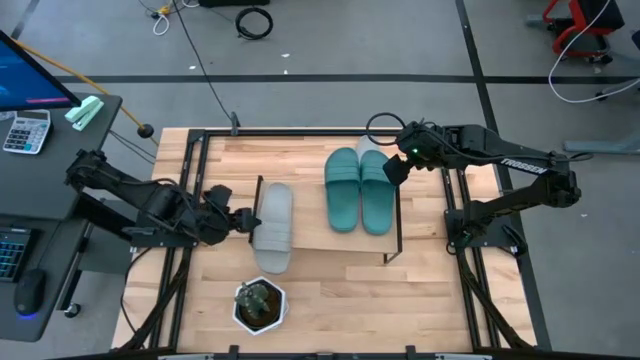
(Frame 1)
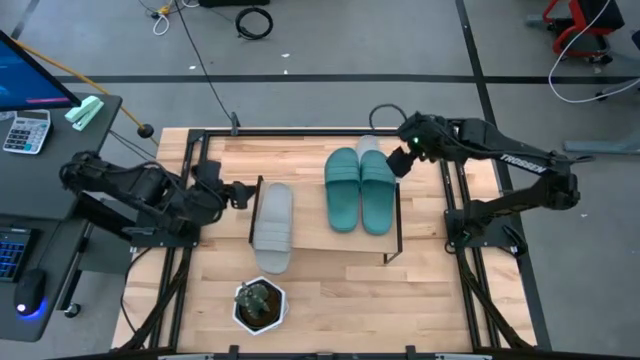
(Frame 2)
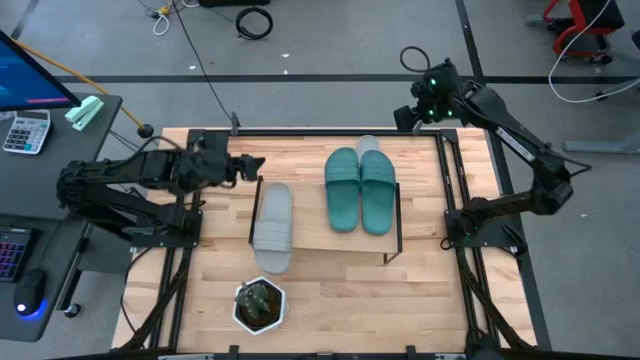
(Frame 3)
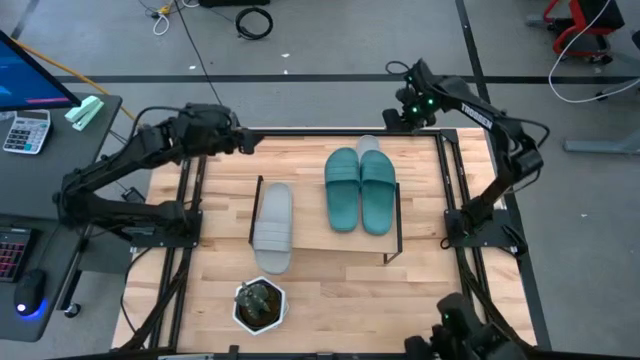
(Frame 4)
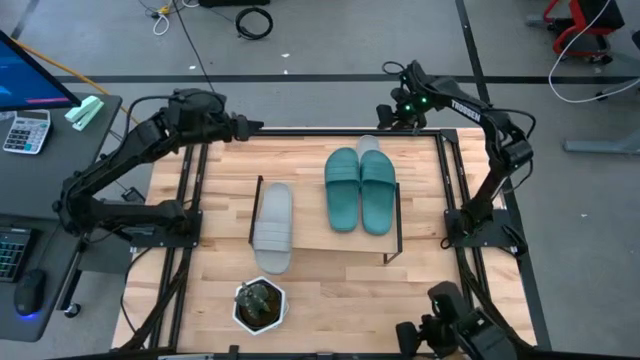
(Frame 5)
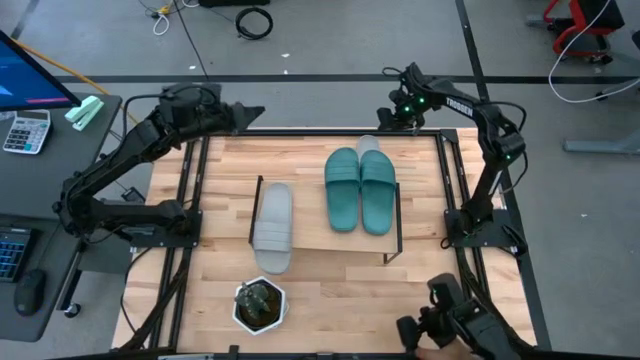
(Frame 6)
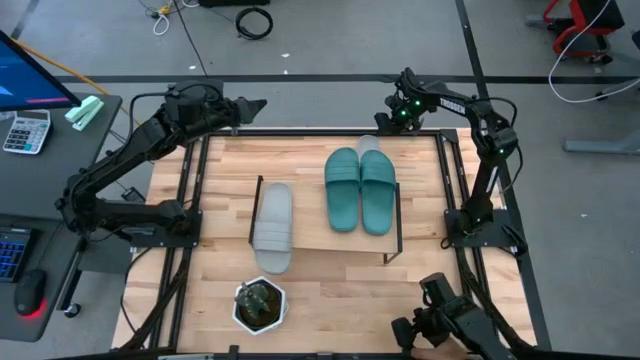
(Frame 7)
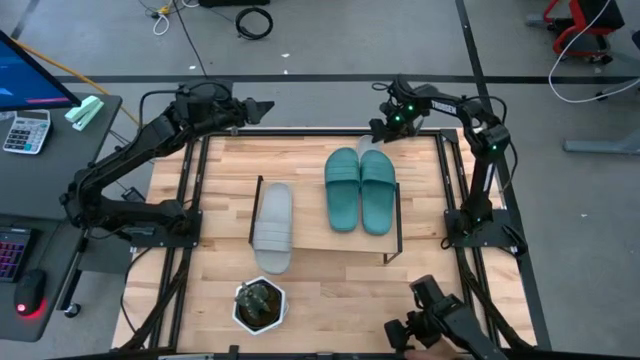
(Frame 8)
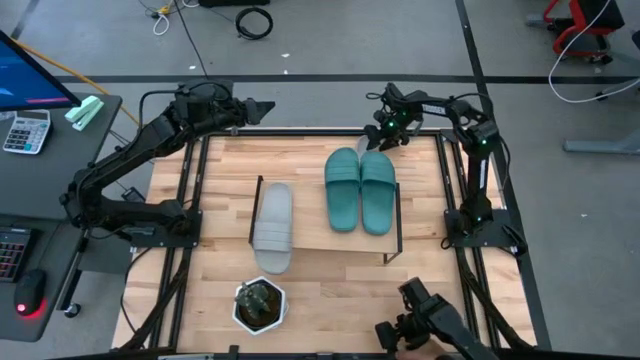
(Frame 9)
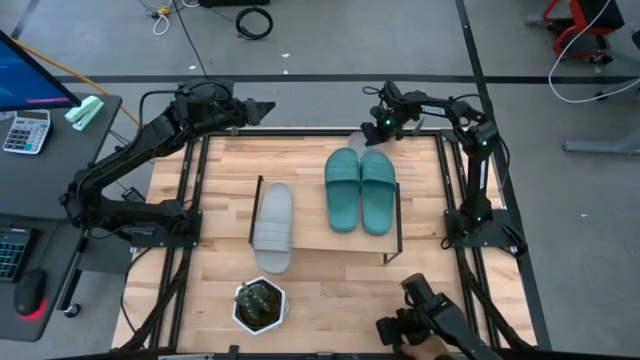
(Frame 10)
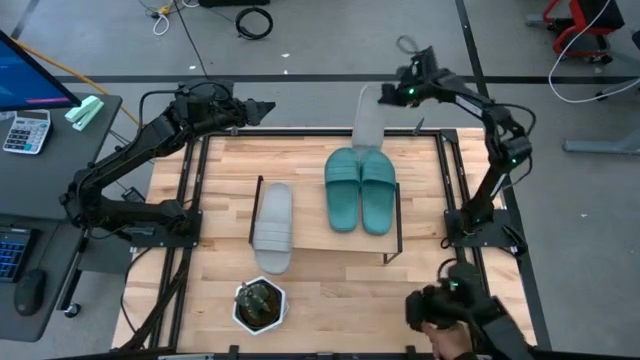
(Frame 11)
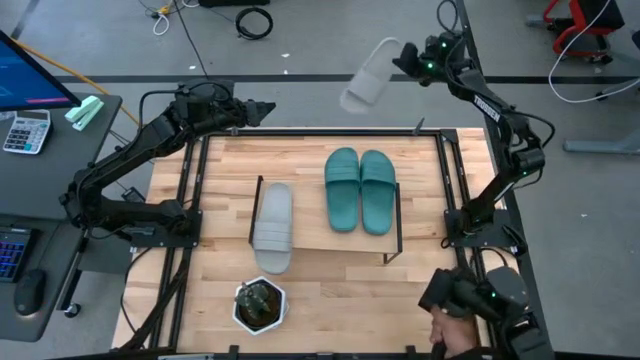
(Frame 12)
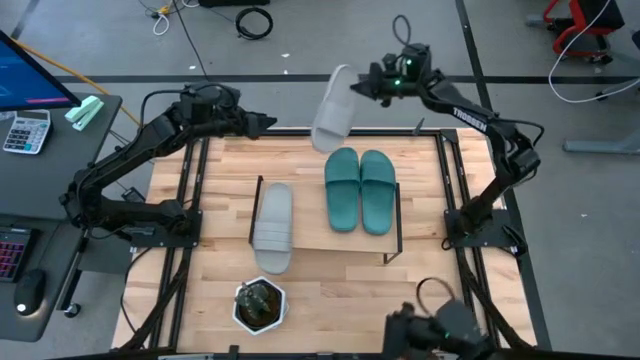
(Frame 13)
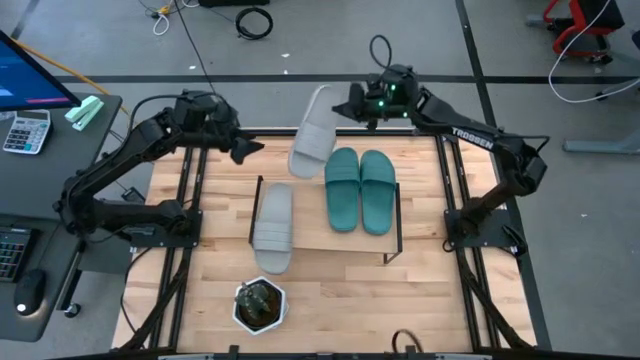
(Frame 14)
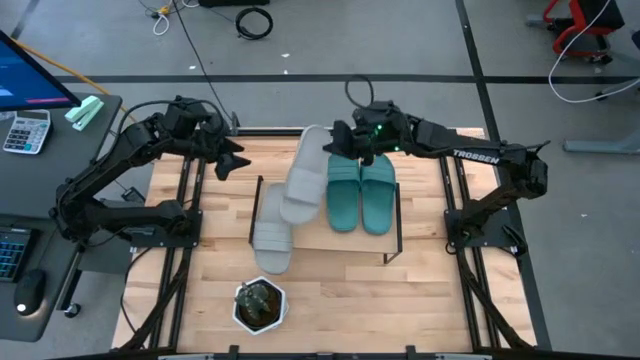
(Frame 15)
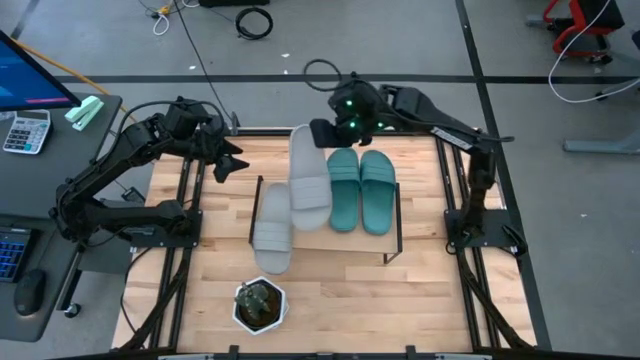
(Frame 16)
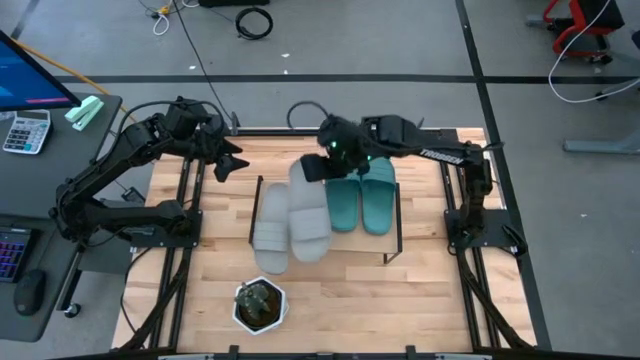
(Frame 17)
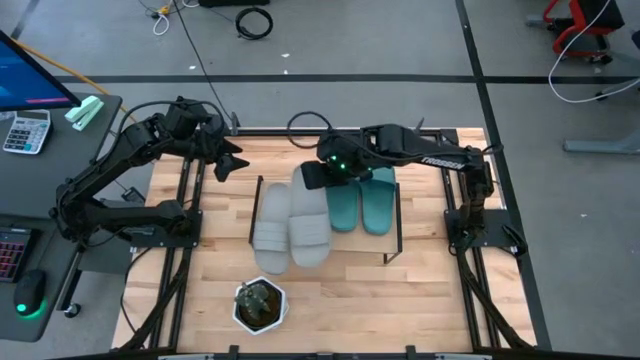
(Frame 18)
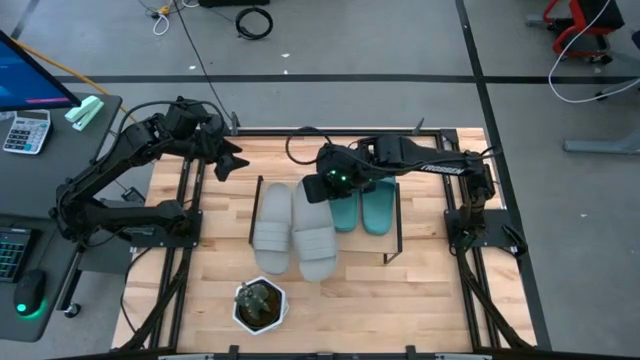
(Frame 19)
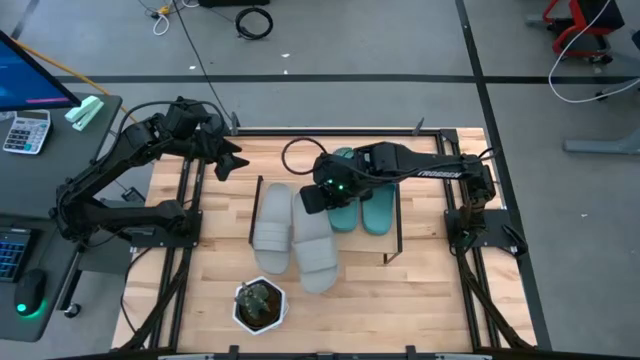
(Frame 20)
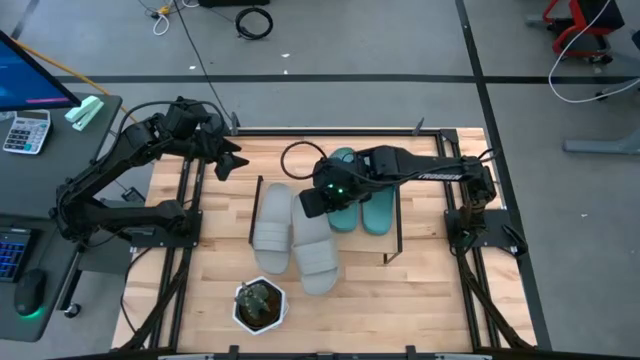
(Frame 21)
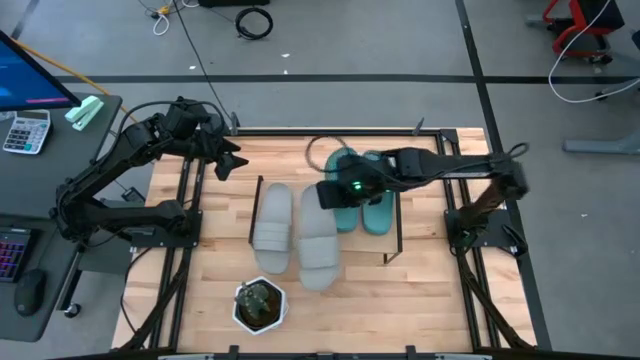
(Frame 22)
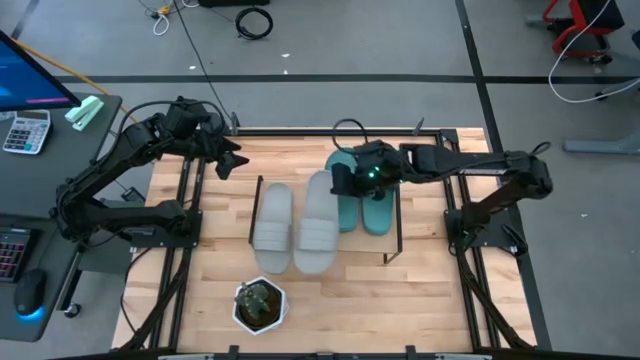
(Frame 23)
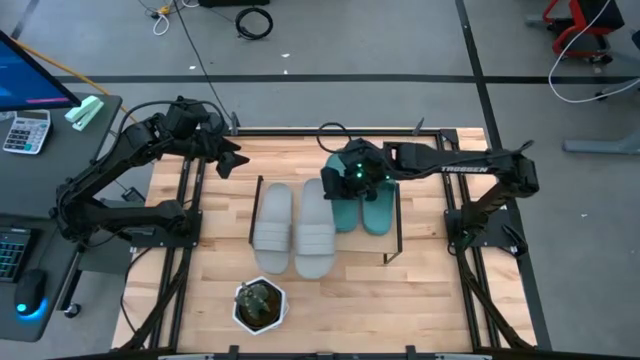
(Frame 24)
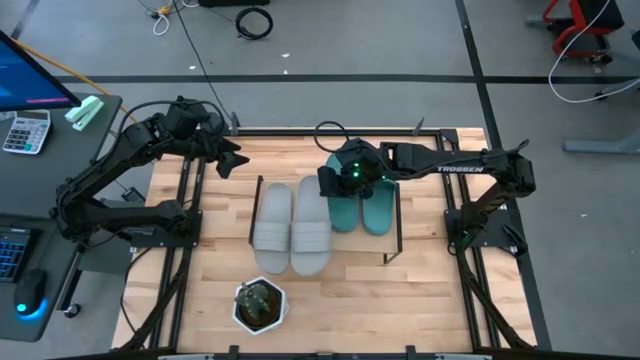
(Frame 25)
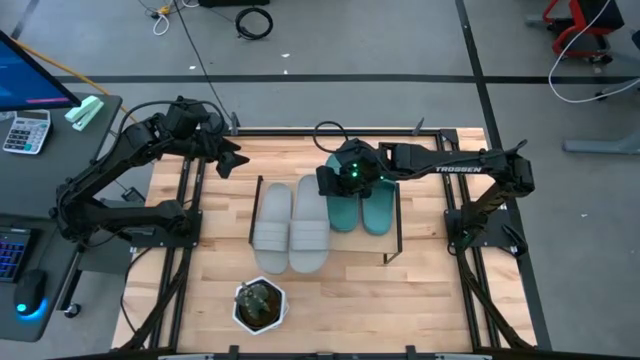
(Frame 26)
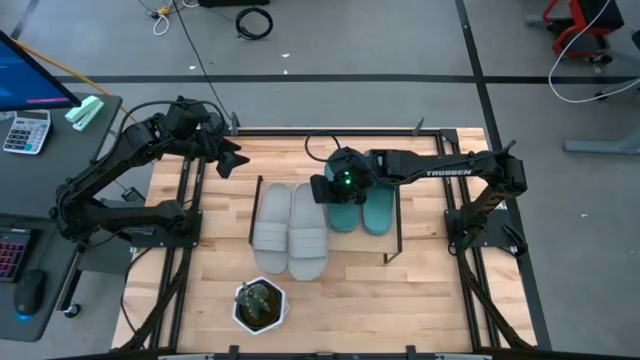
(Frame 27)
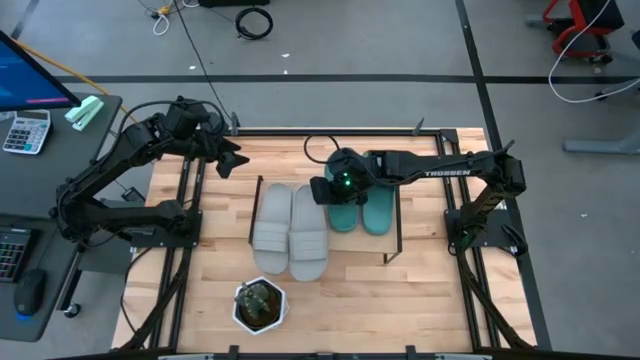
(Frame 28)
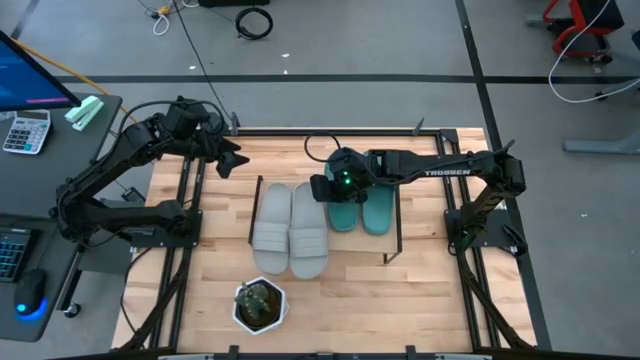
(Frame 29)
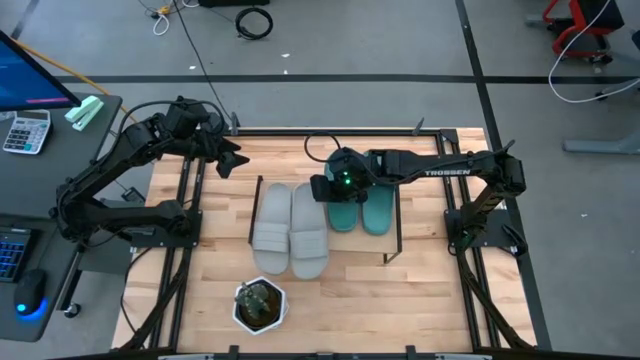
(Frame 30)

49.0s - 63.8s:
Task: Pick and place slides into the shelf
Put the gray slide on the shelf

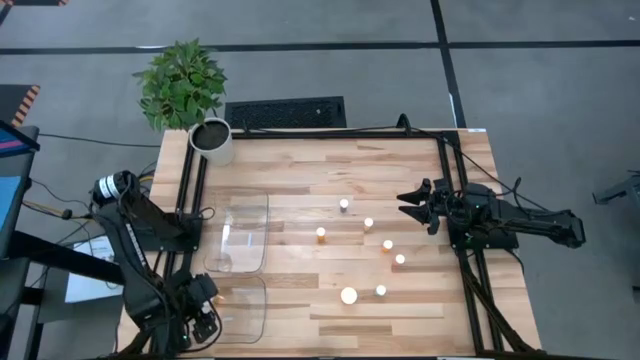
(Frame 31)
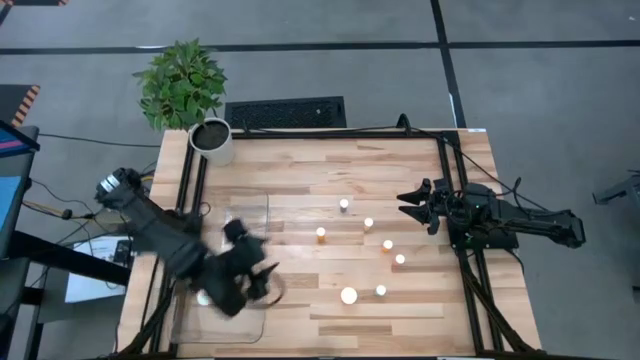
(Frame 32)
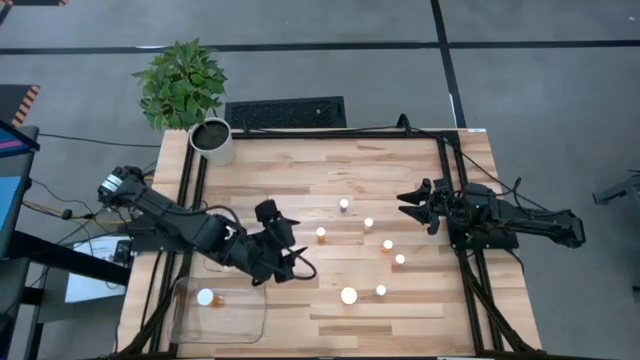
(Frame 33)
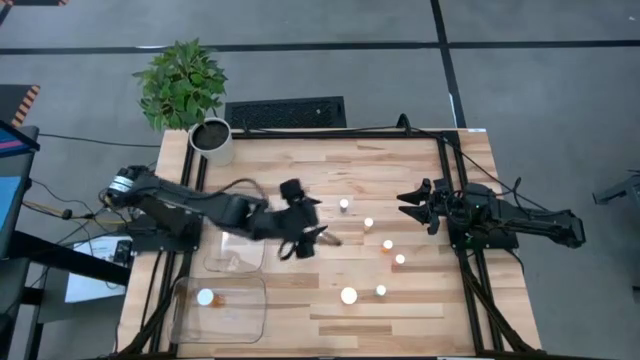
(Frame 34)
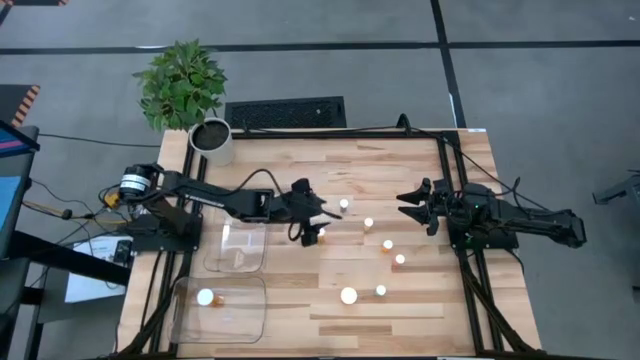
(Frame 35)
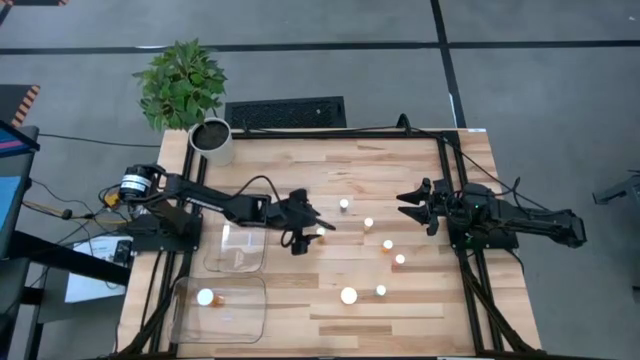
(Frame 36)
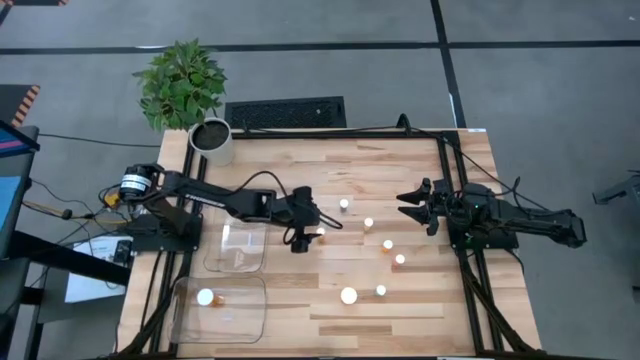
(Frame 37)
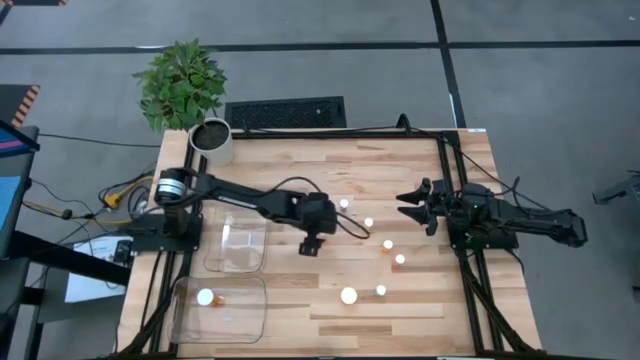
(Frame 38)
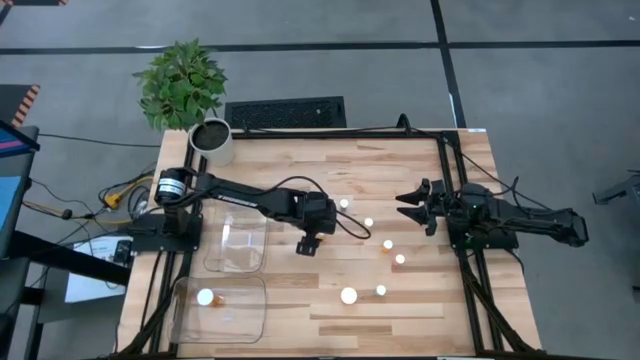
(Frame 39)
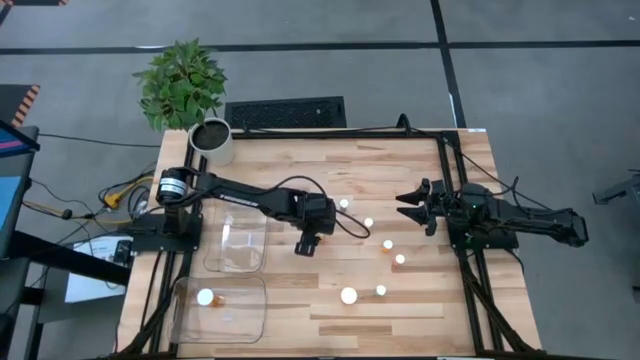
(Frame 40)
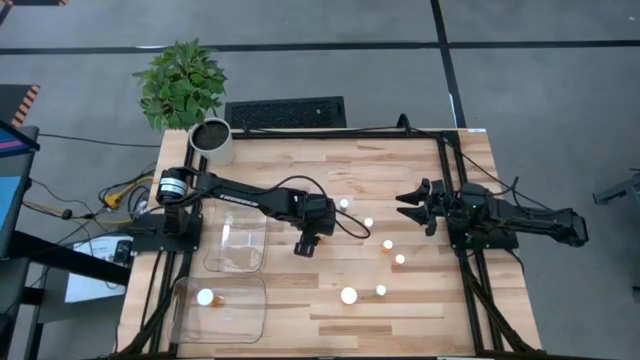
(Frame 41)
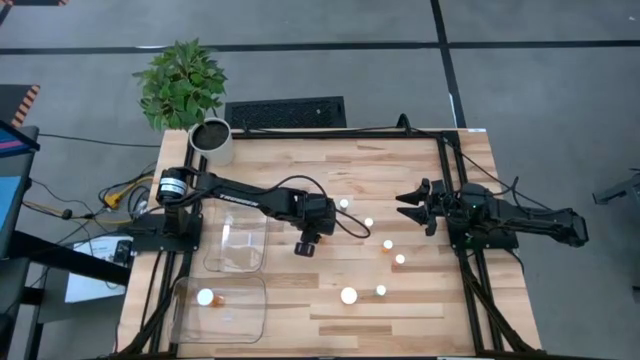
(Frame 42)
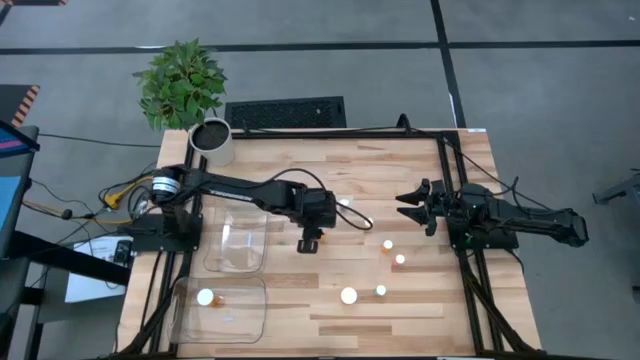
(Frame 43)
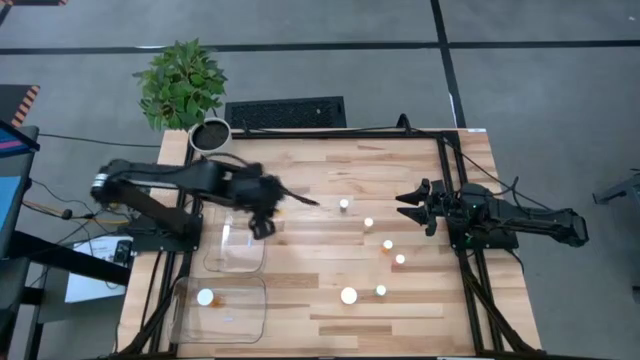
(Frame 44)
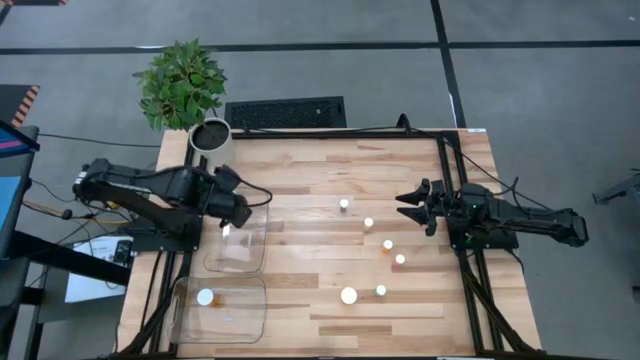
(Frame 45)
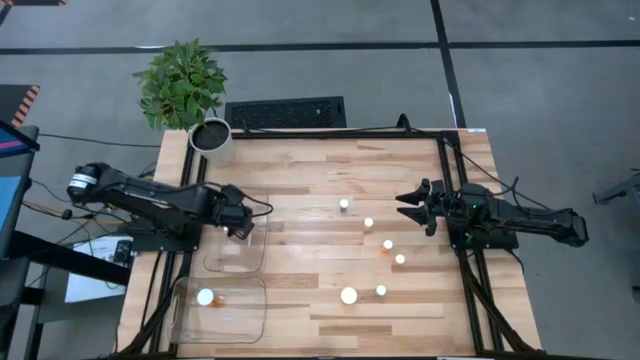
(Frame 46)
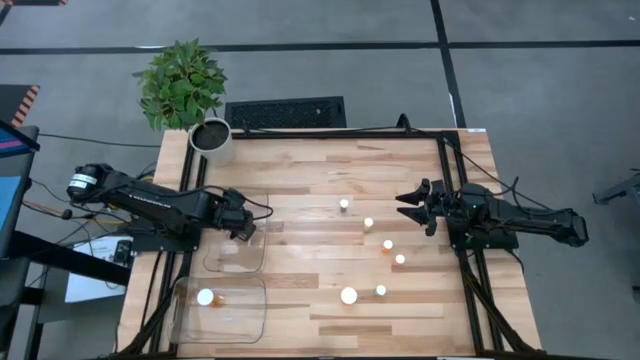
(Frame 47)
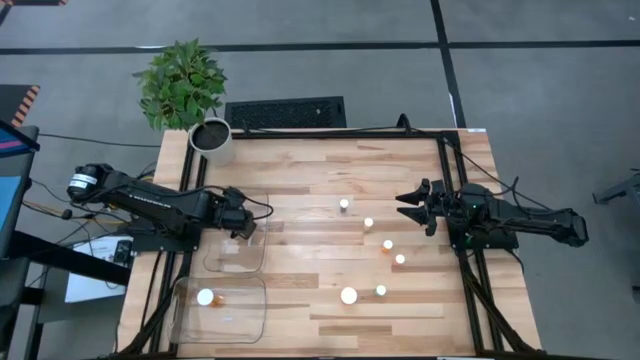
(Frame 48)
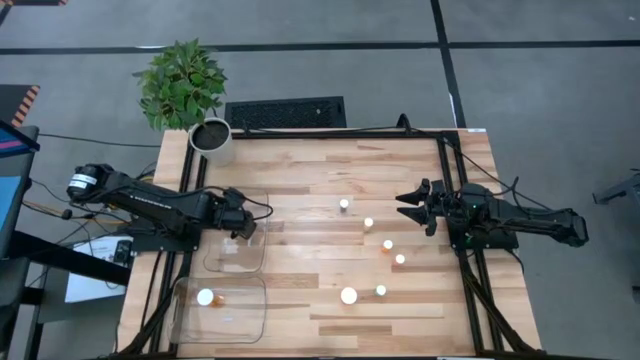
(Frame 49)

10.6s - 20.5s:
Task: Pick and place medicine bottles into bin by pill shape (circle, oval)
Put the orange tablet bottle into the top transparent bin
